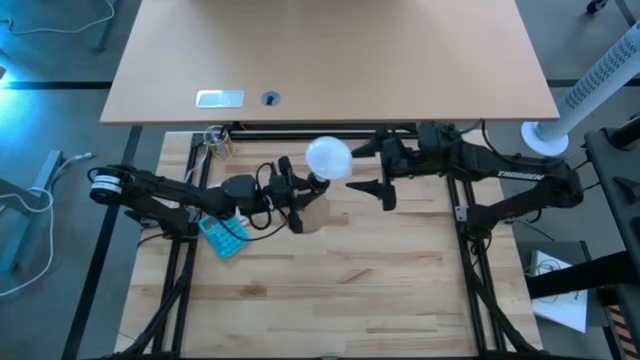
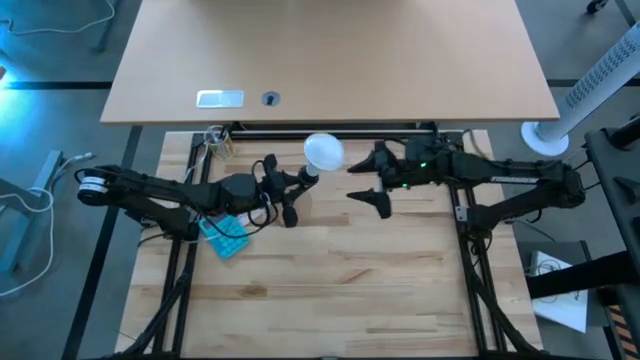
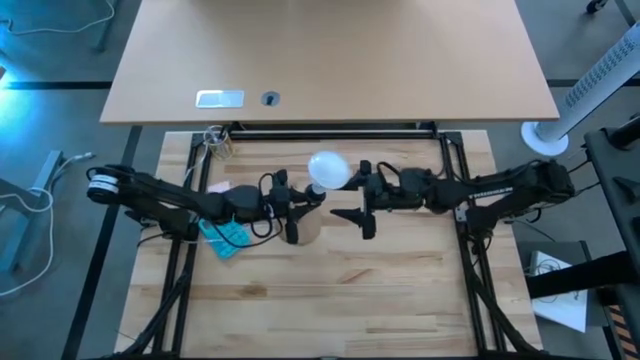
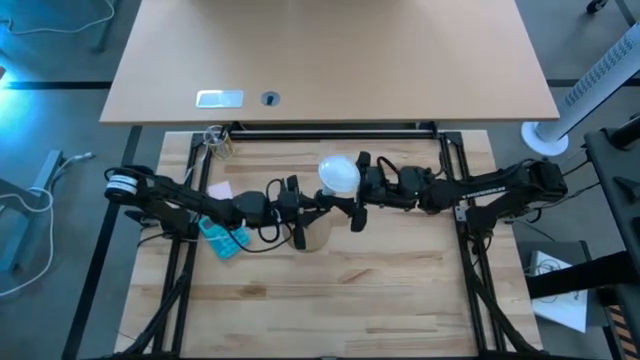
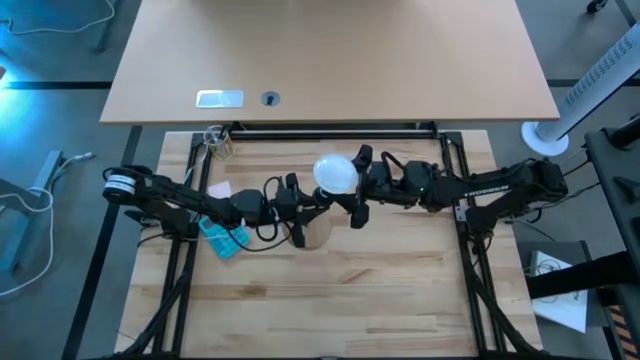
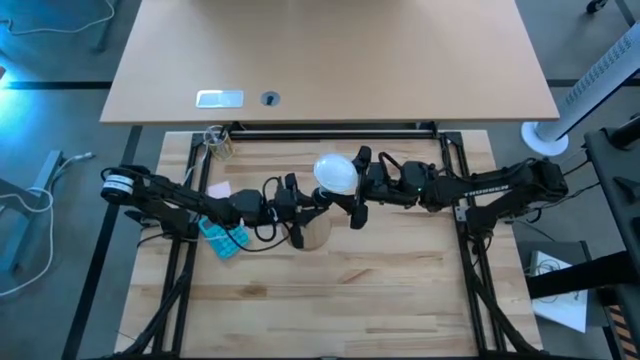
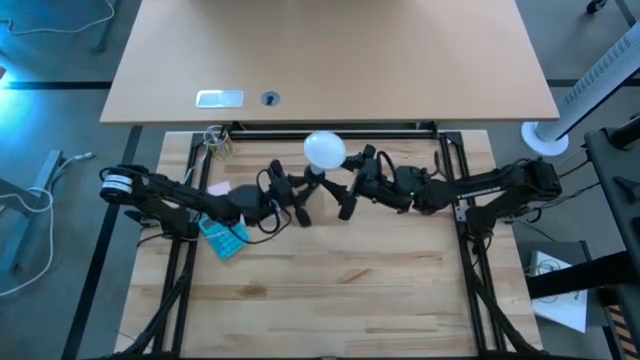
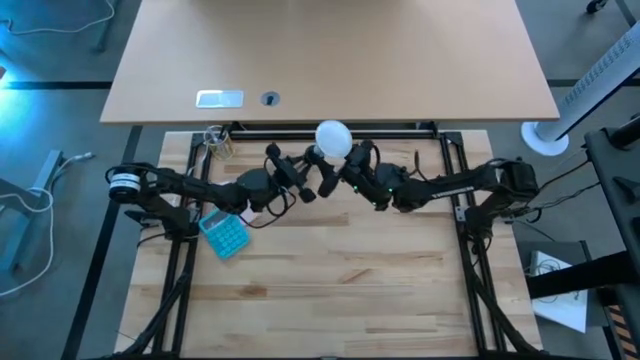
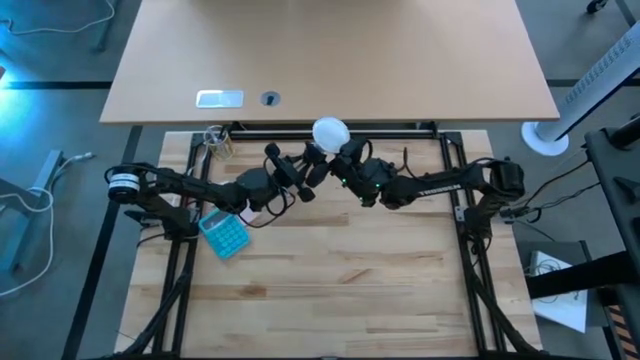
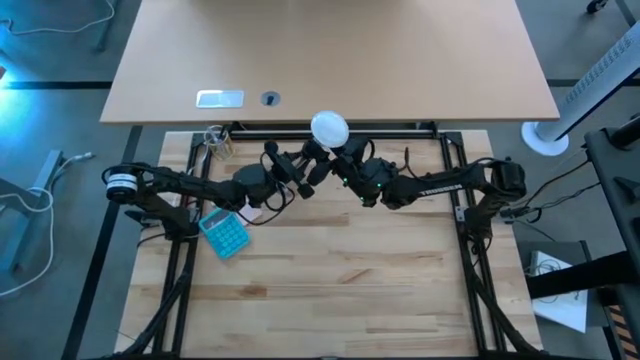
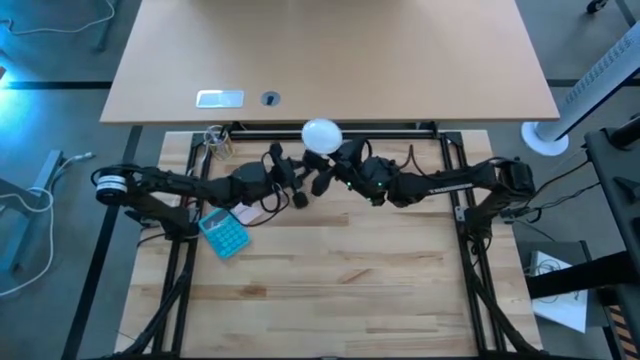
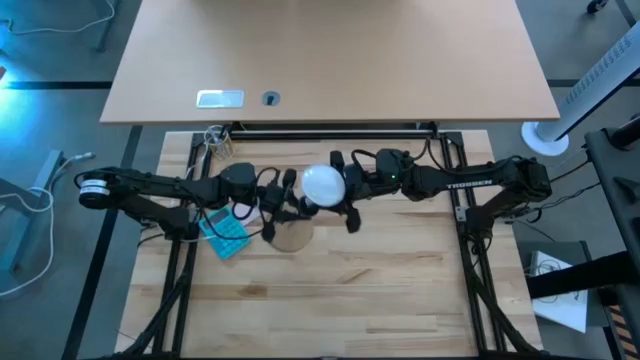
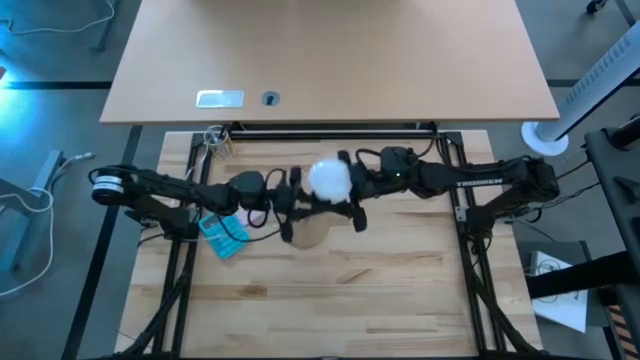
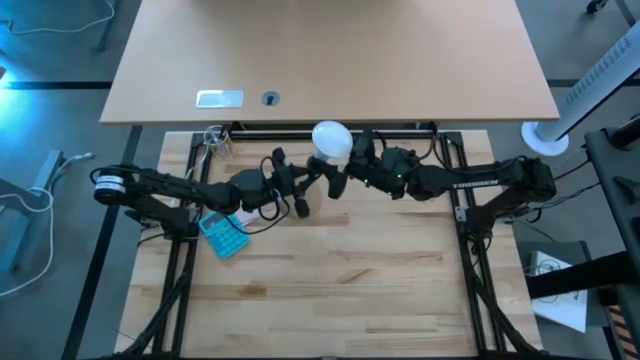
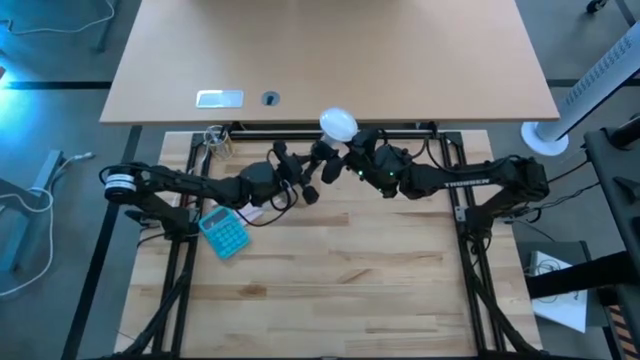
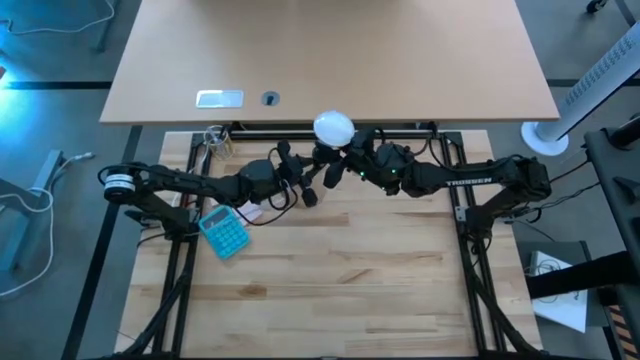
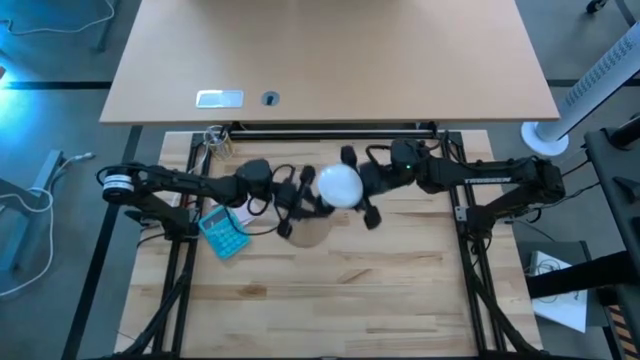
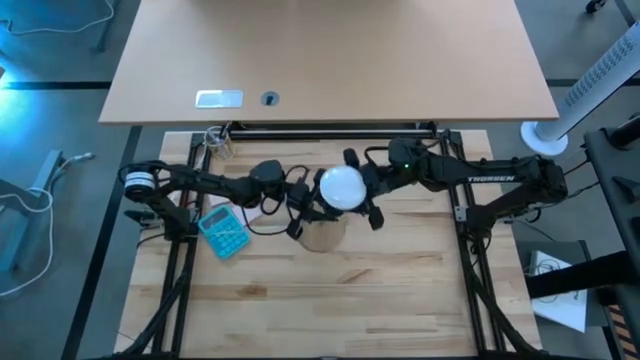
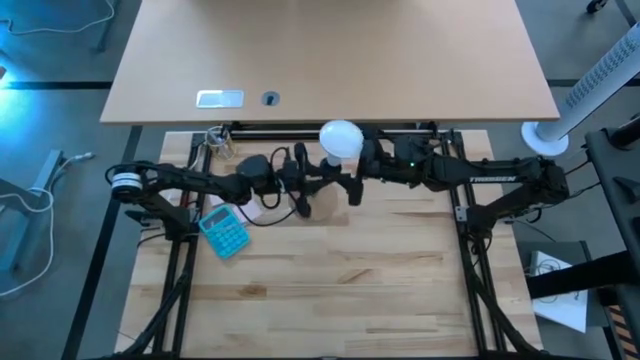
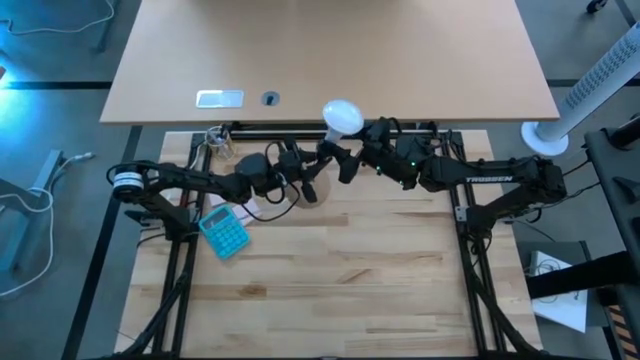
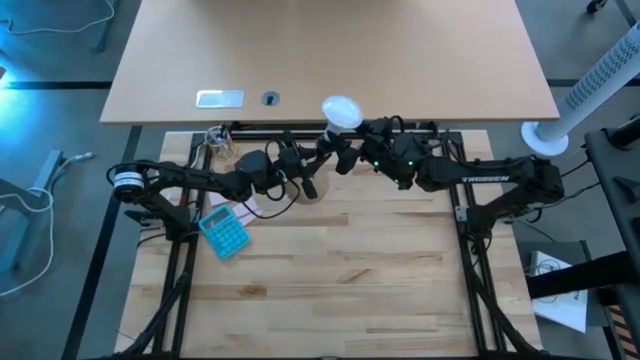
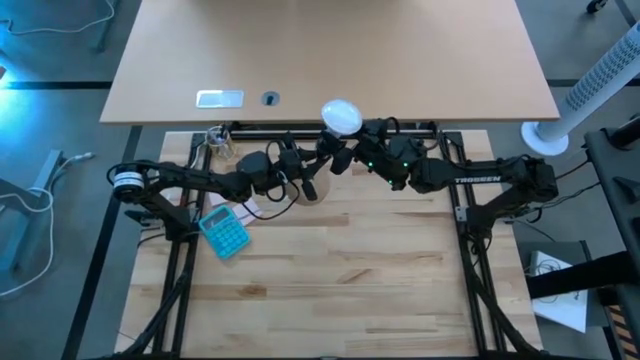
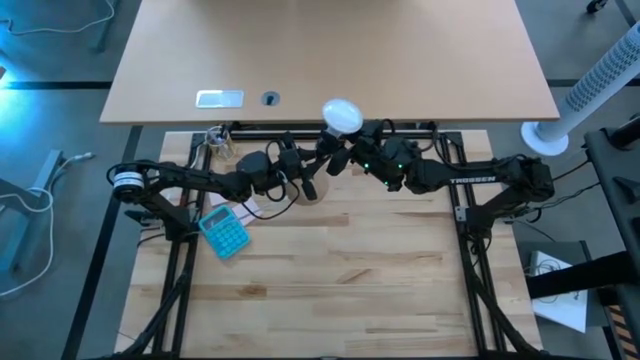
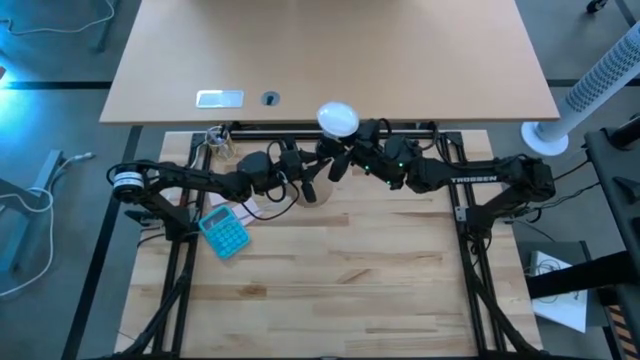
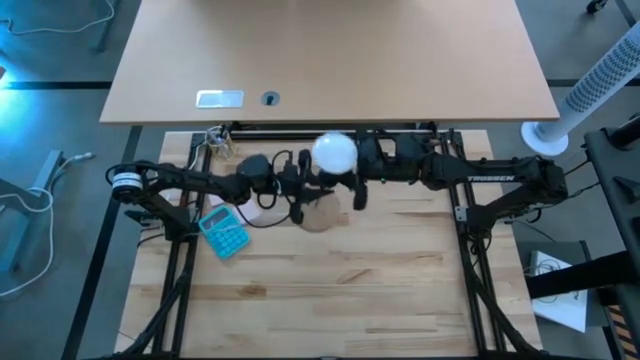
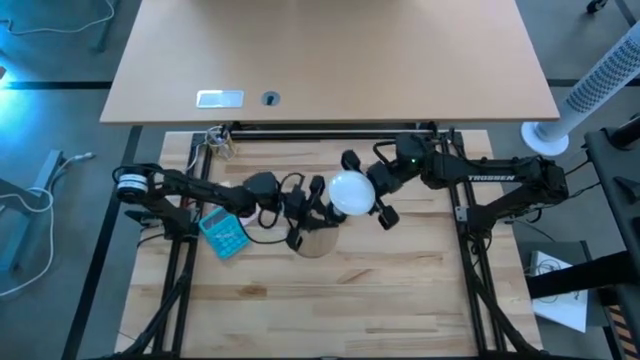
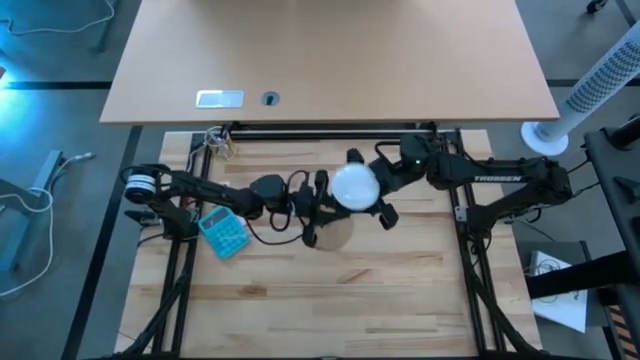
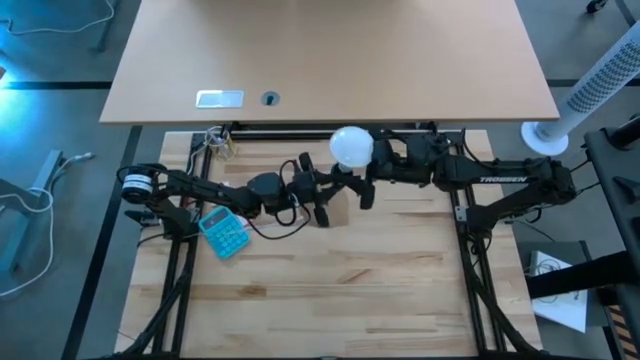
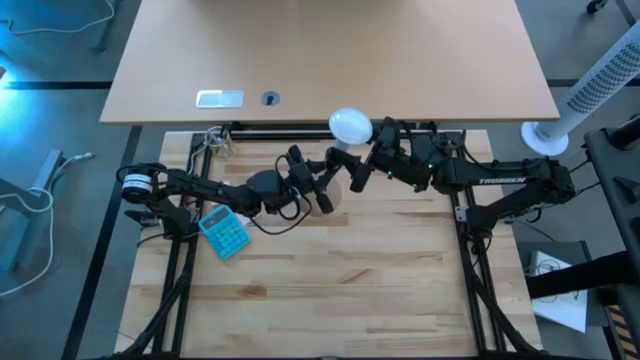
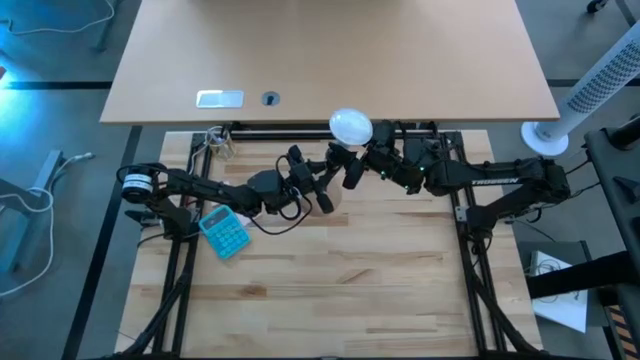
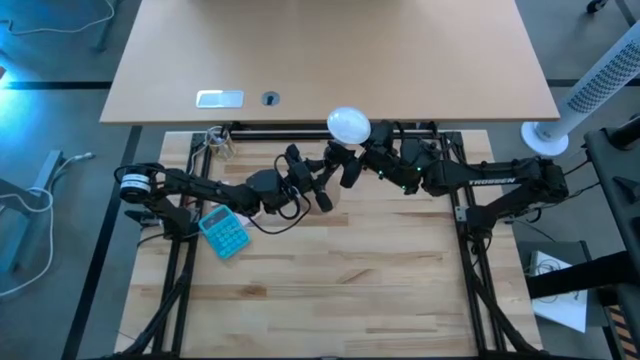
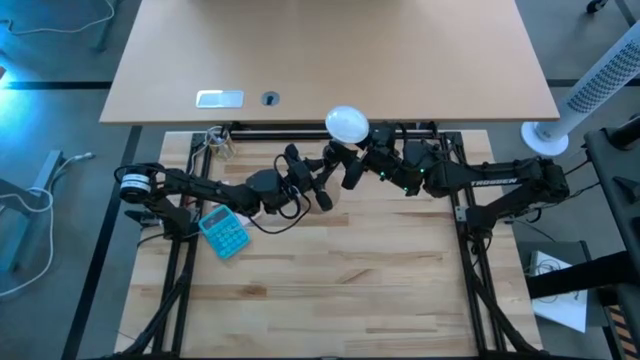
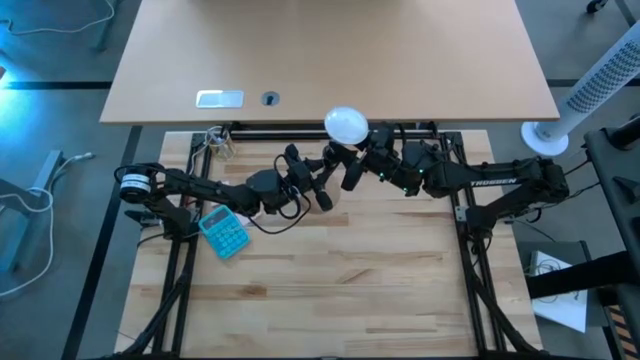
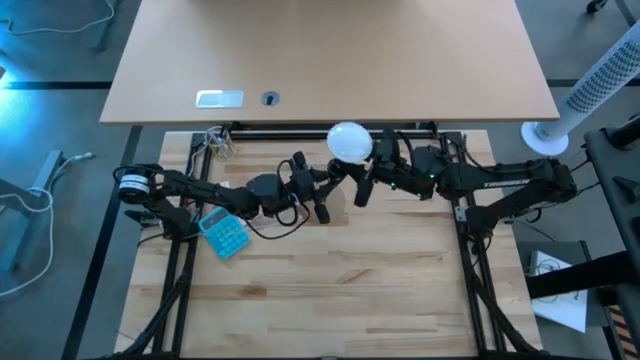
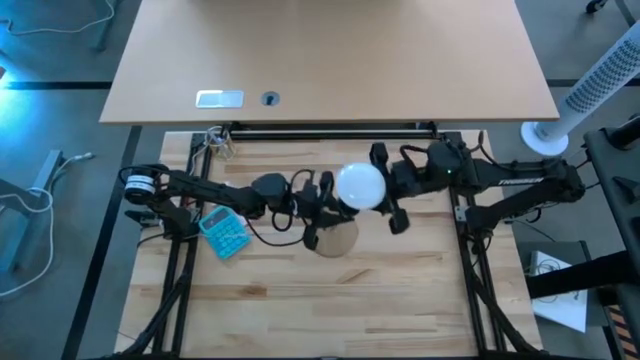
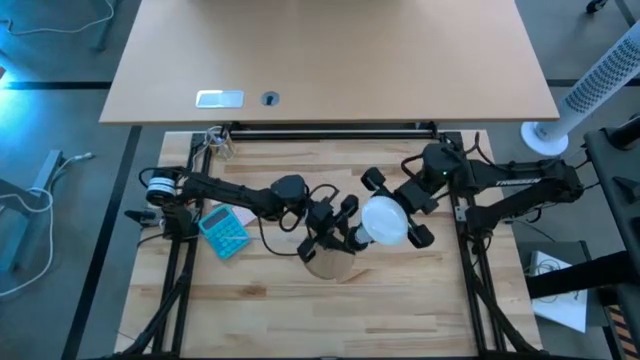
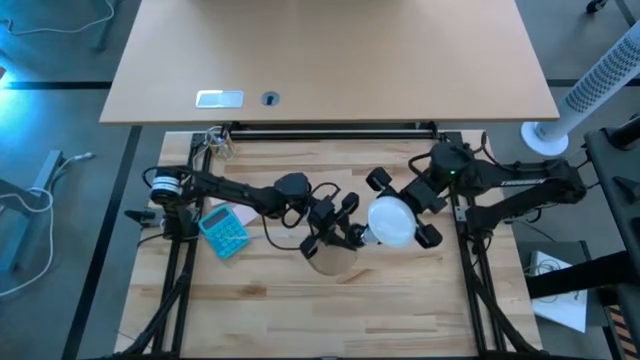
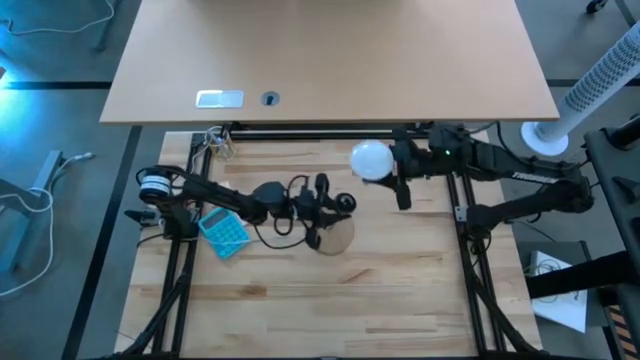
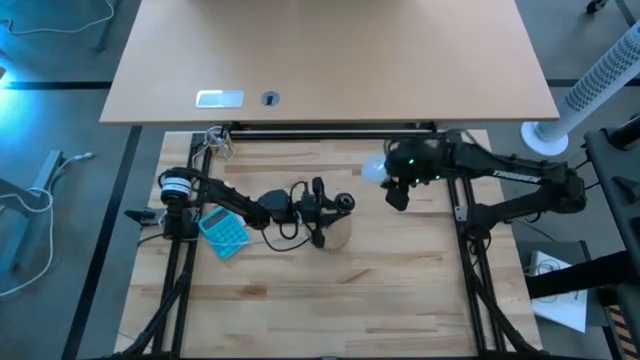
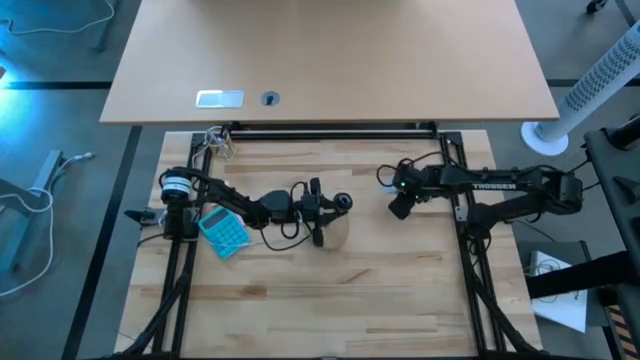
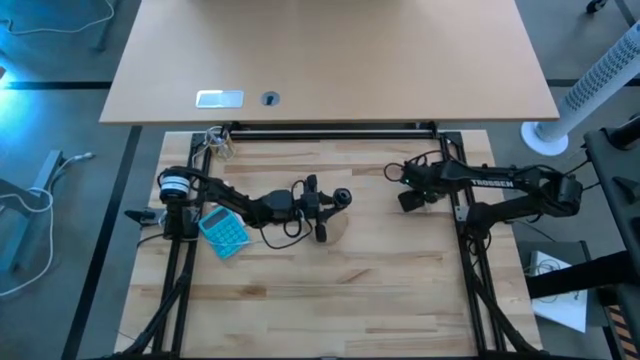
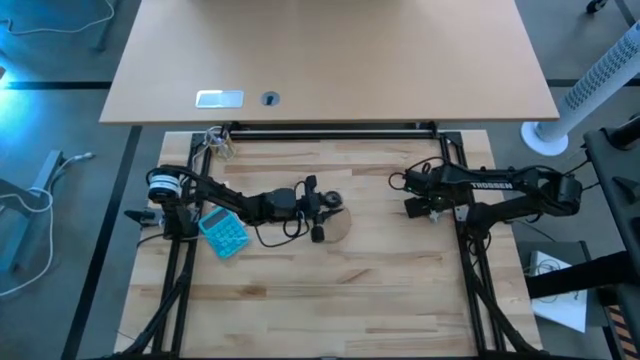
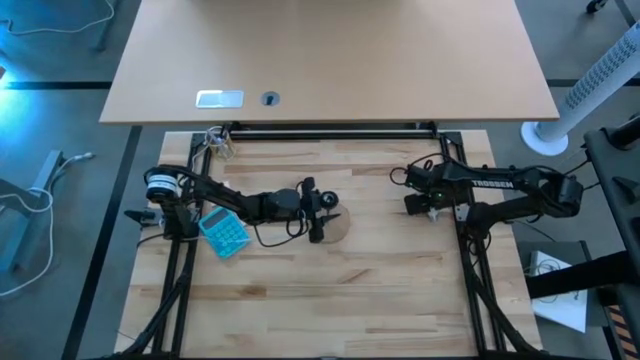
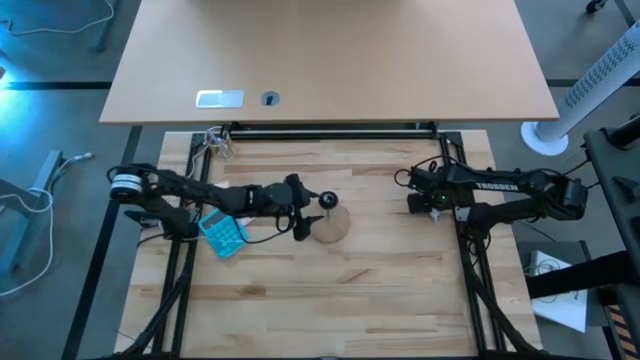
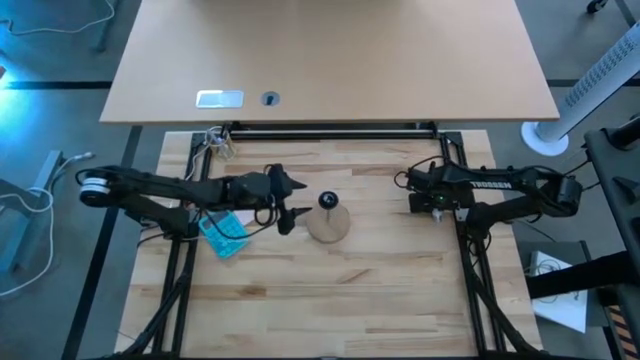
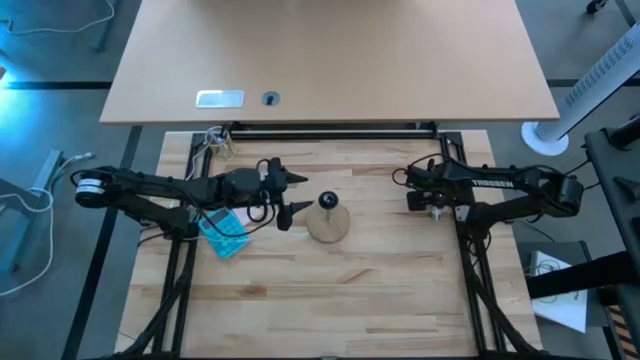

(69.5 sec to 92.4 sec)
Task: Screw lightbulb
Remove the lightbulb from the lamp
